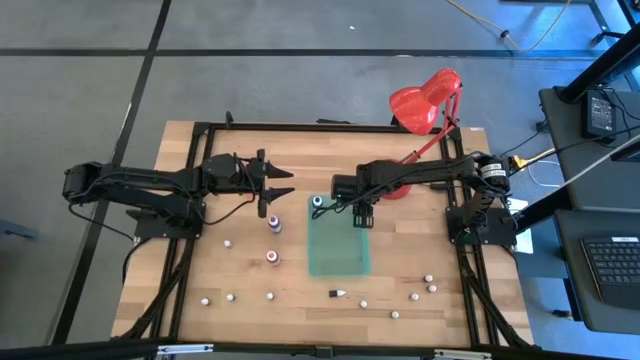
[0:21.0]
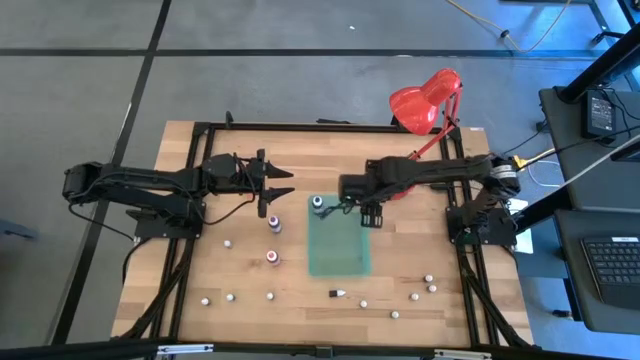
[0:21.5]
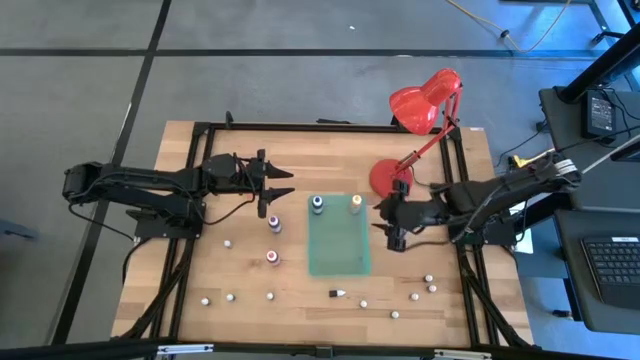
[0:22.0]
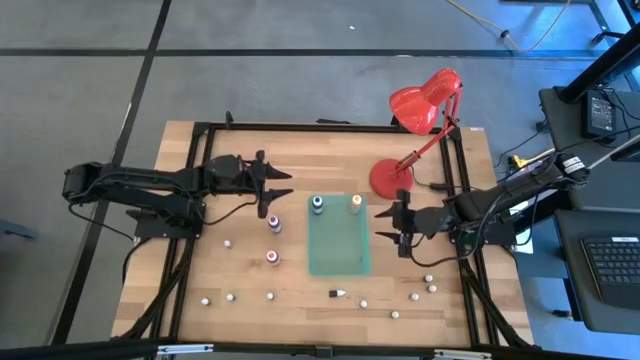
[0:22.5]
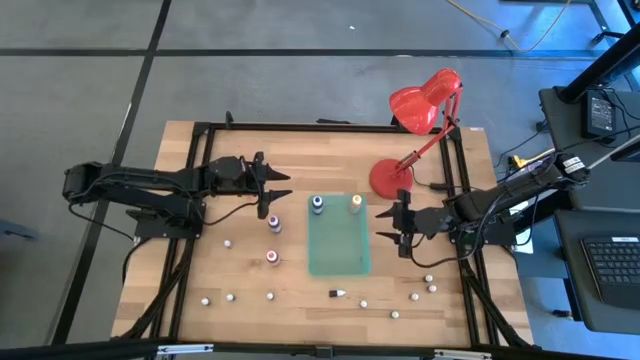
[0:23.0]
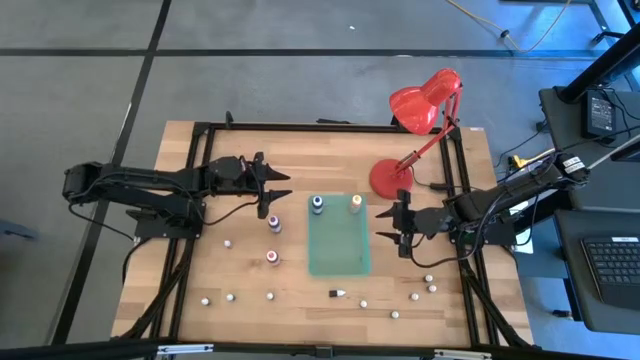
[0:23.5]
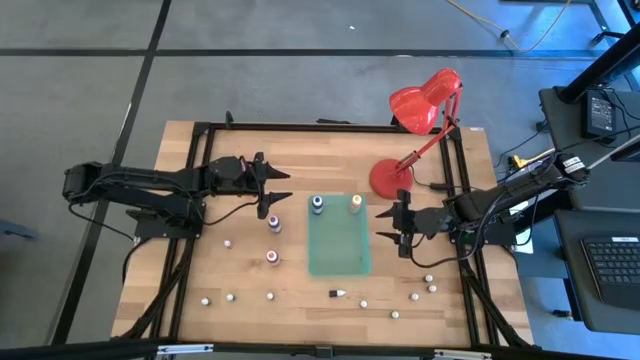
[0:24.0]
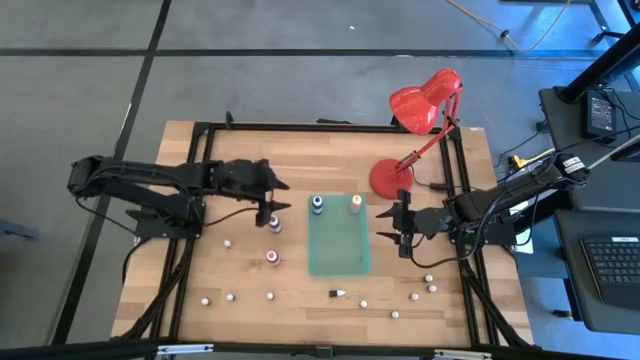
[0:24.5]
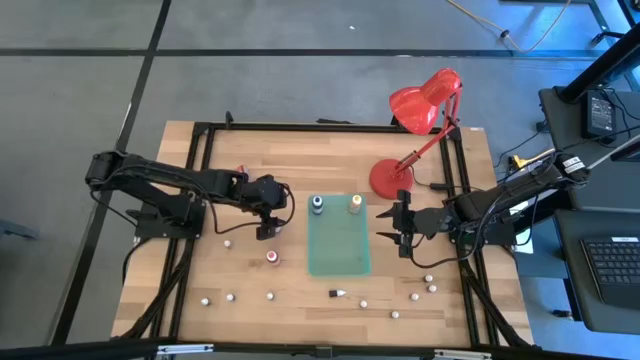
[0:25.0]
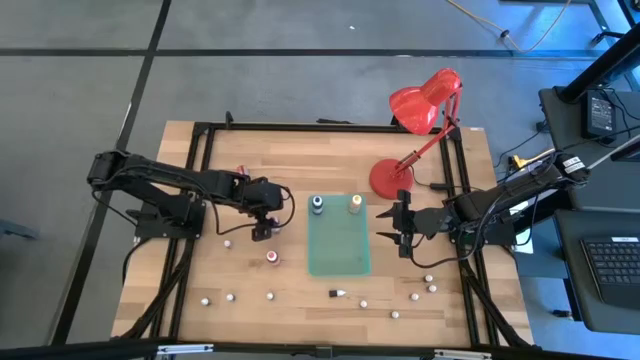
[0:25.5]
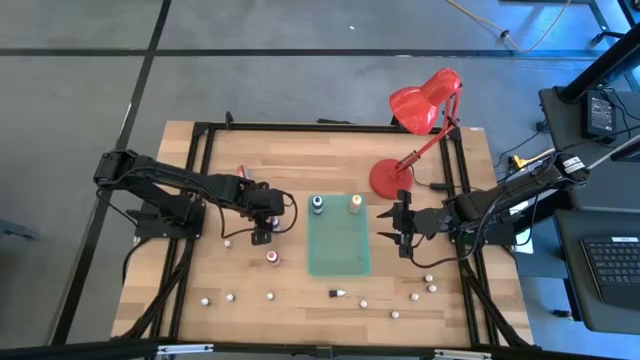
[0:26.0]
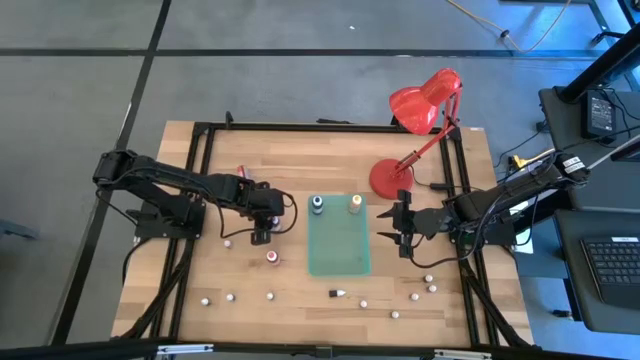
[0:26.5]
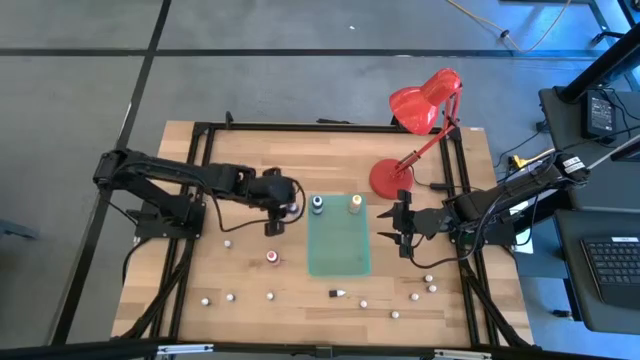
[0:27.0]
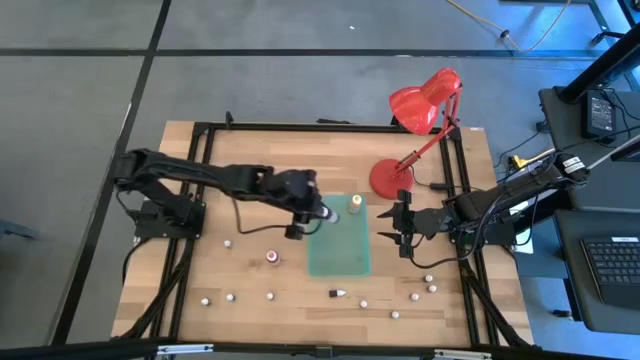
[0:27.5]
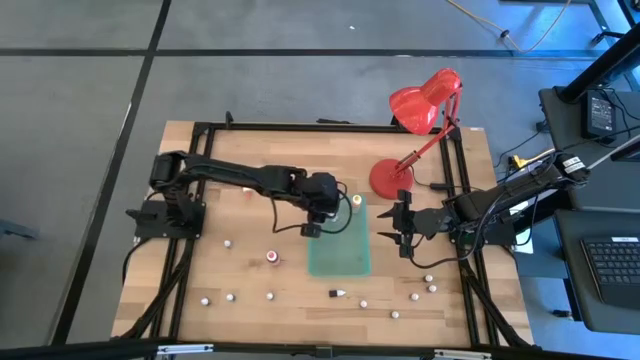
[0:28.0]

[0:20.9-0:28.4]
Task: Pick & Place food coloring
Put the large violet food coloring bottle into the green bin

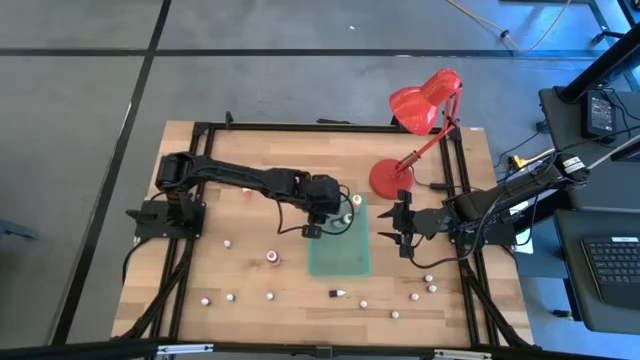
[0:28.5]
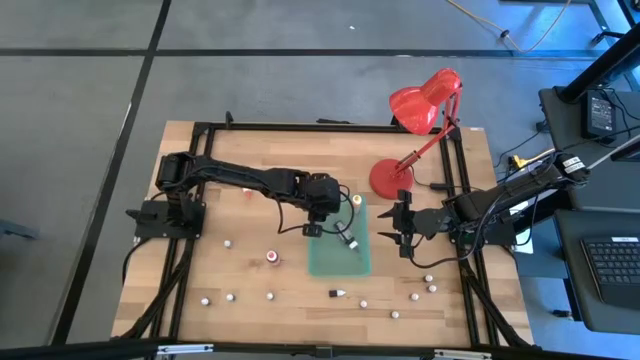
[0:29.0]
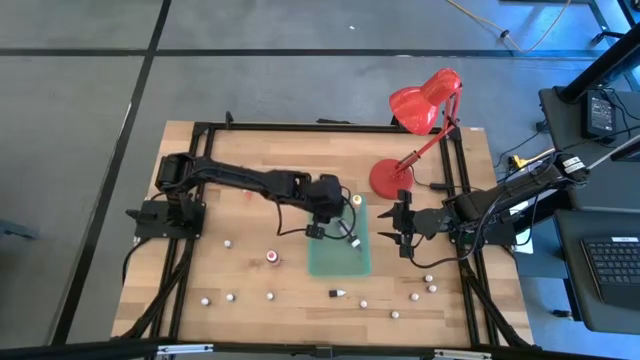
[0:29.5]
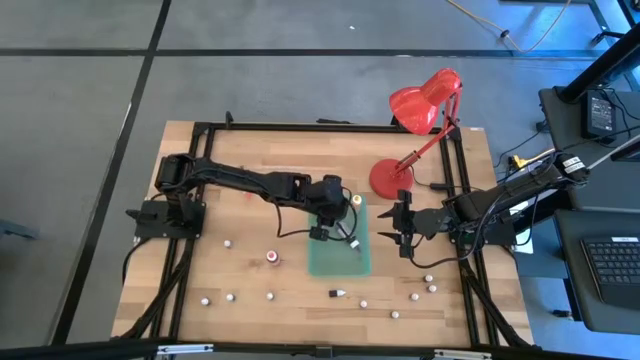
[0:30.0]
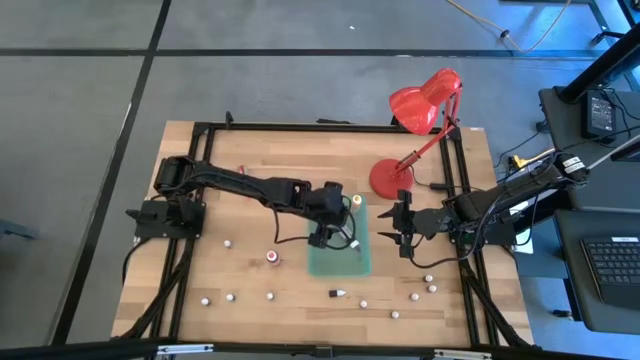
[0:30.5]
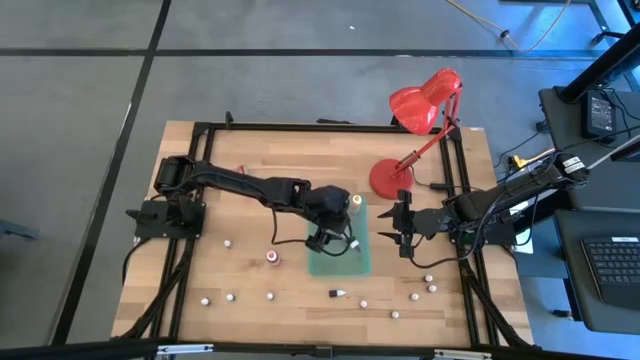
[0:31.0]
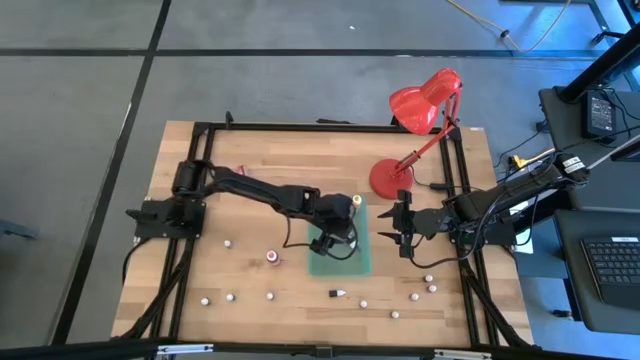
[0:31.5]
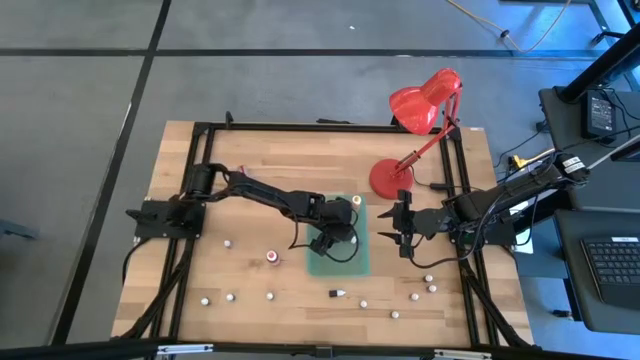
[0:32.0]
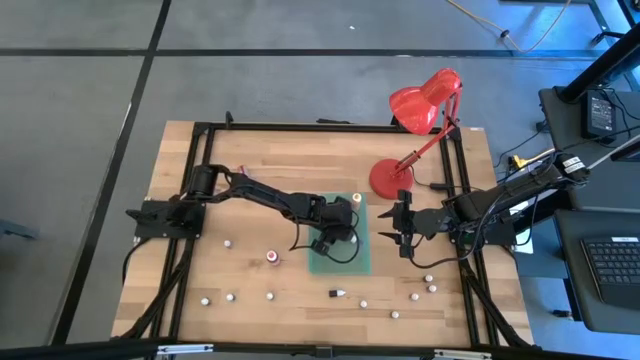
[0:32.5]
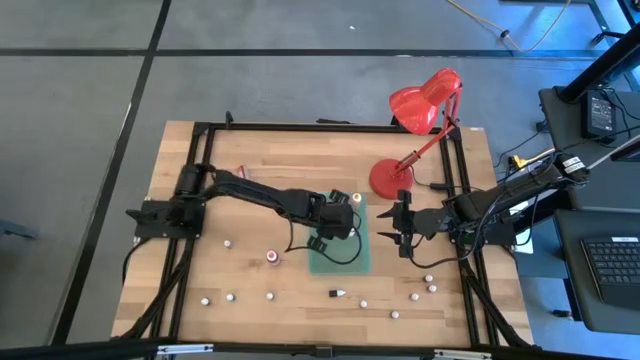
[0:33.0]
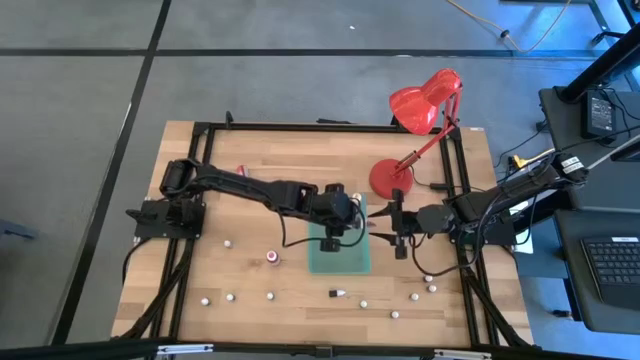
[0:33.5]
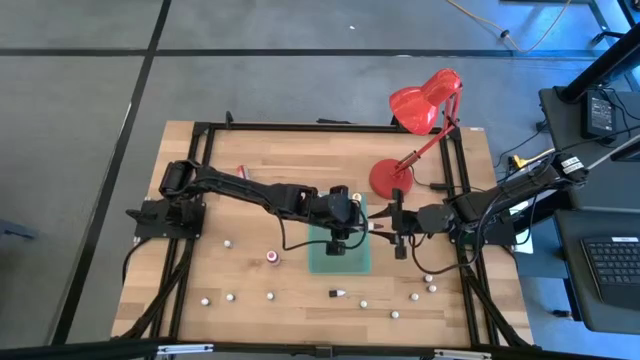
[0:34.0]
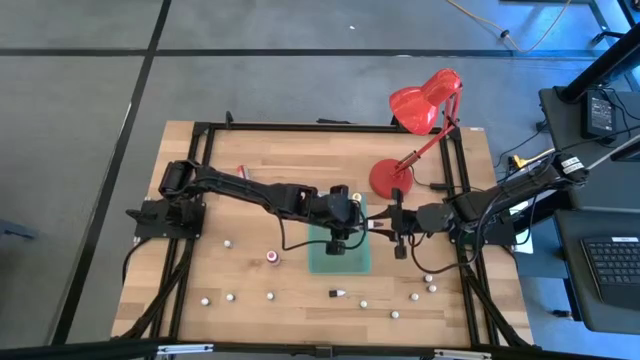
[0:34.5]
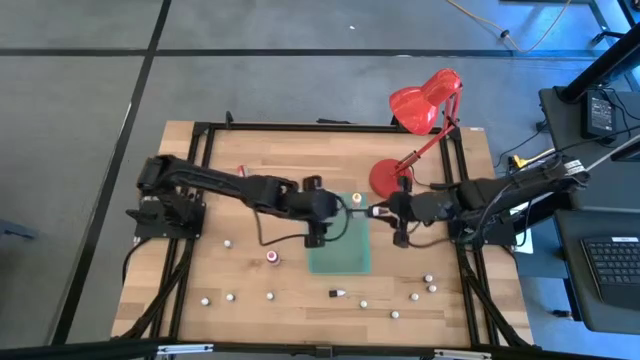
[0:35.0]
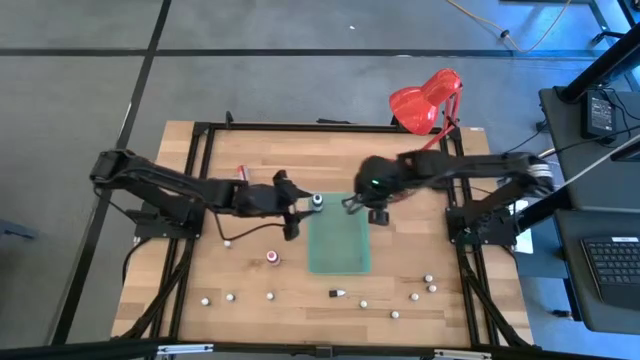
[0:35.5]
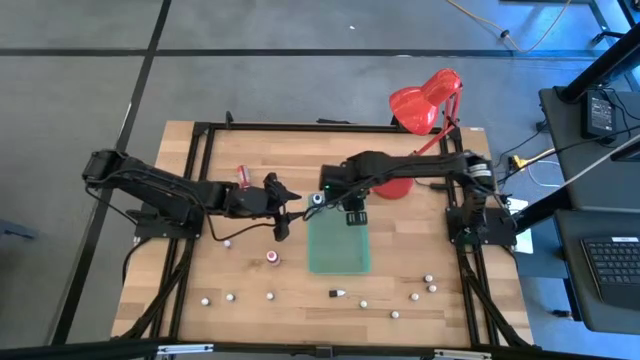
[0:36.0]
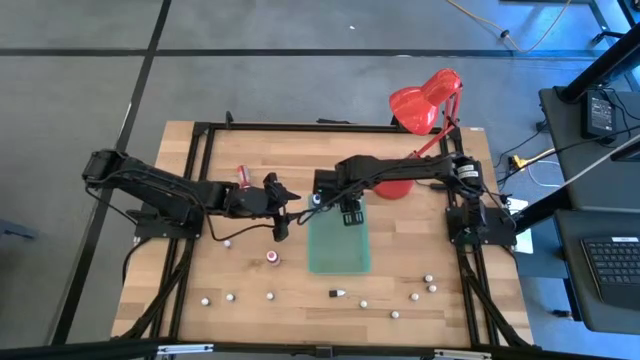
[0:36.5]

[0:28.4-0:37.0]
Put the large violet food coloring bottle into the green bin

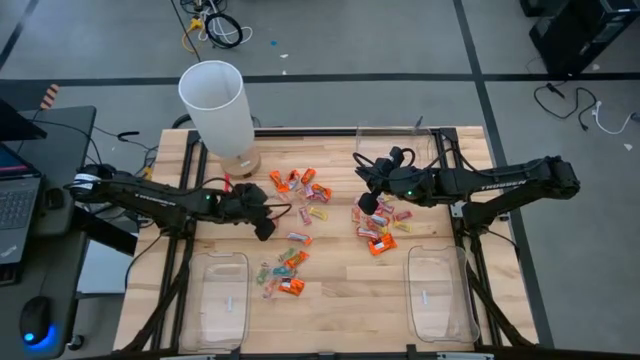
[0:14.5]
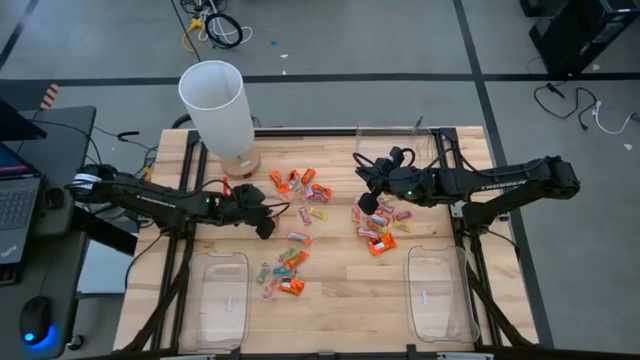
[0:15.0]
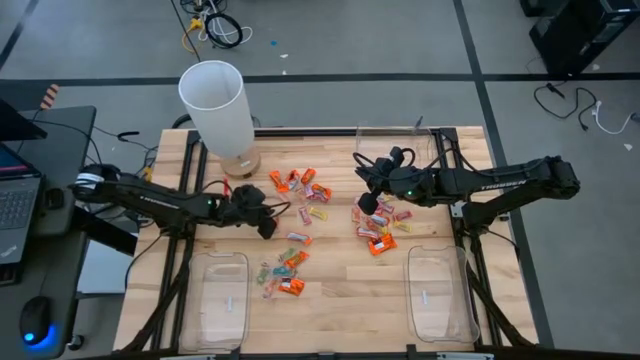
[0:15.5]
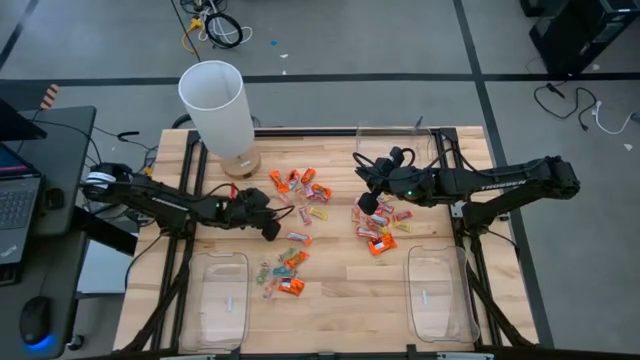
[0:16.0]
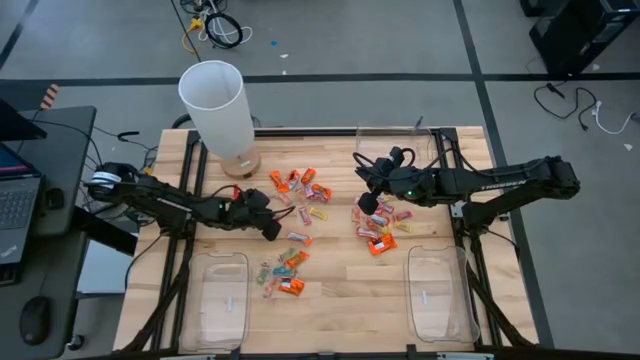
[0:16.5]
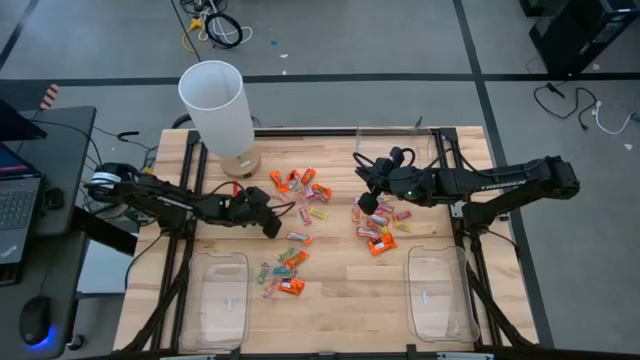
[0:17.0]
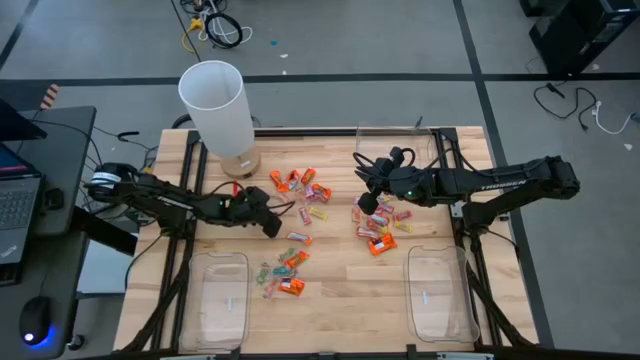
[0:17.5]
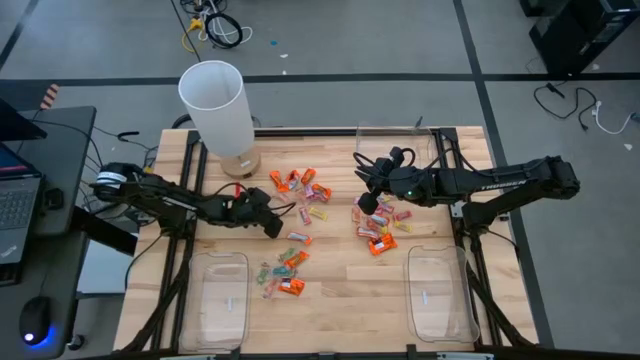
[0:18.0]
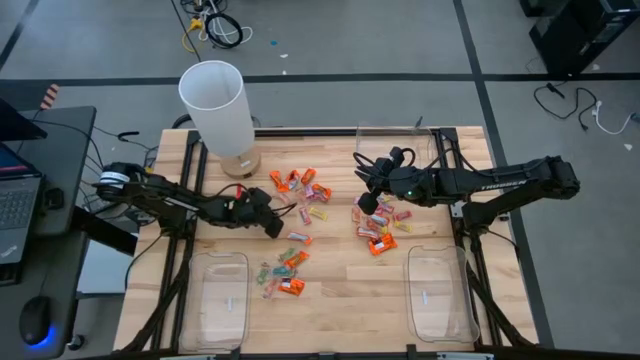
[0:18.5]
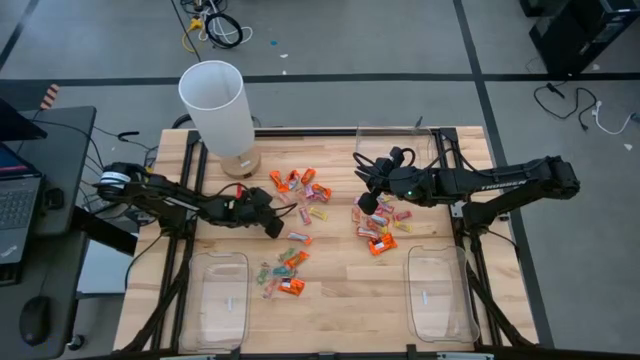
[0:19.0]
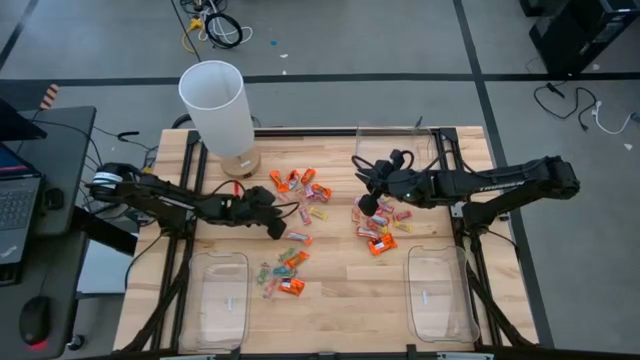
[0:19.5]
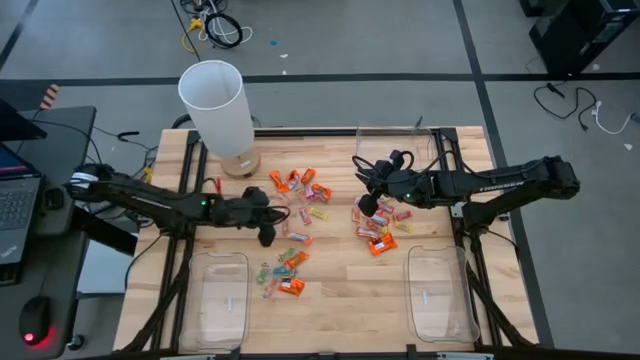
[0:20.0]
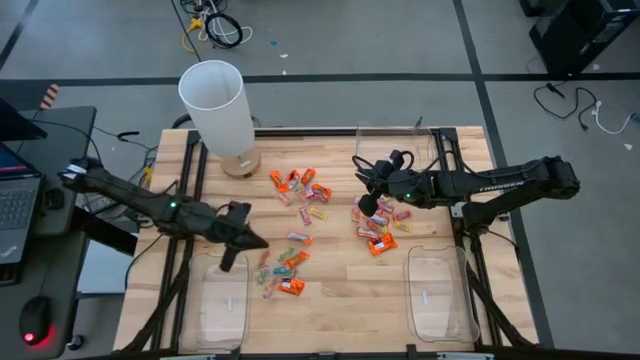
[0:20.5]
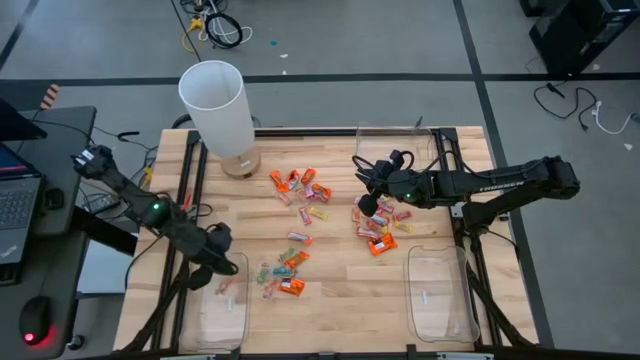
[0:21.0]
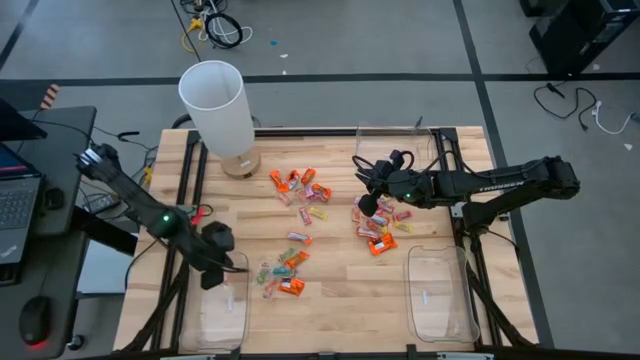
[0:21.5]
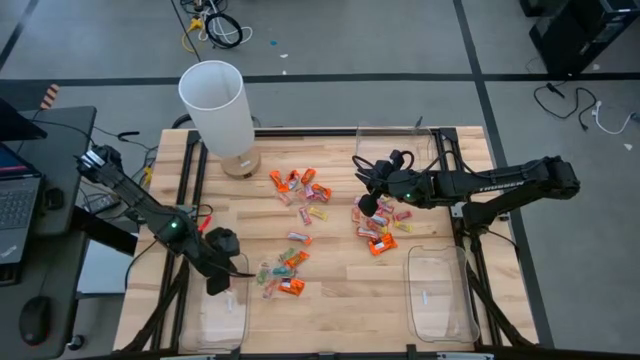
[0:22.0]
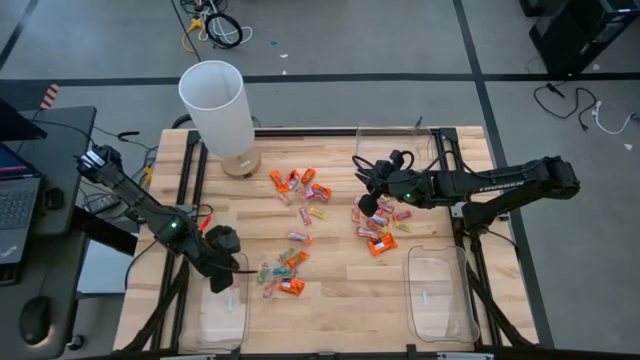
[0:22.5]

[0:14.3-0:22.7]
Task: Sort candy
Put the orange gummy into the bottom left transparent bin
